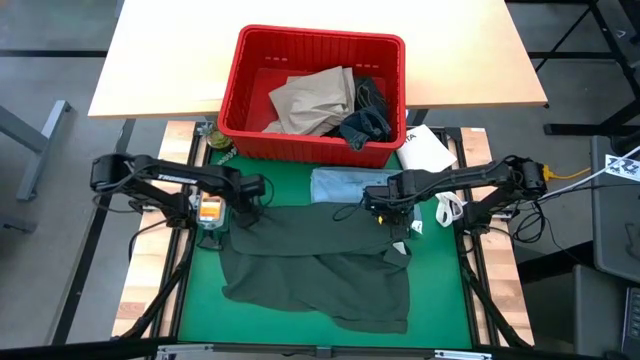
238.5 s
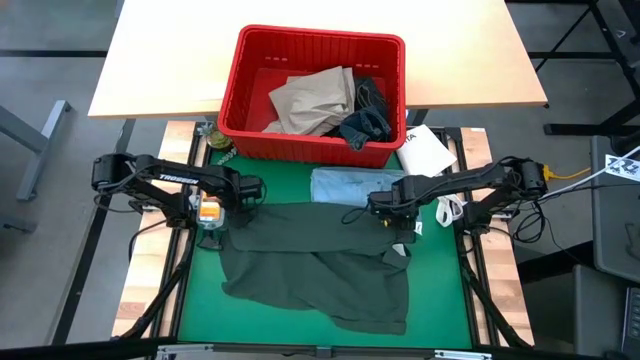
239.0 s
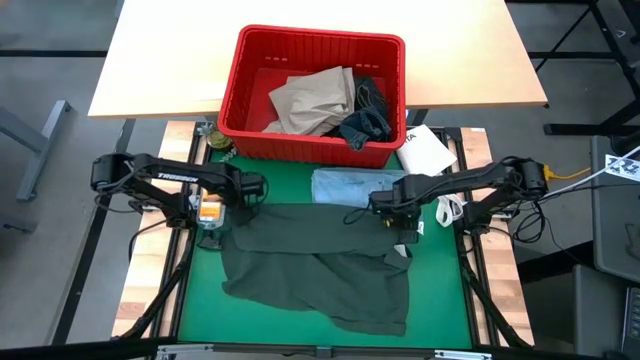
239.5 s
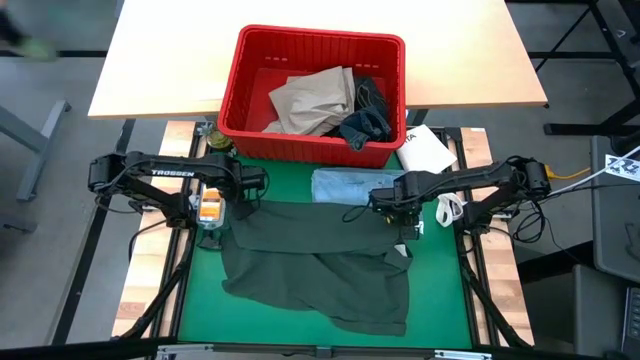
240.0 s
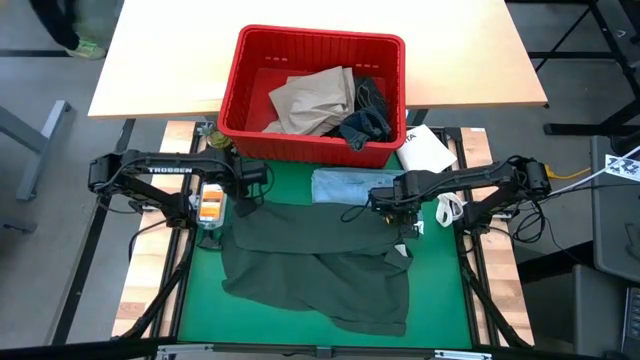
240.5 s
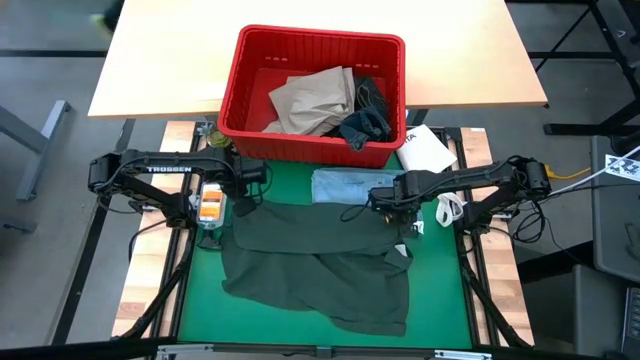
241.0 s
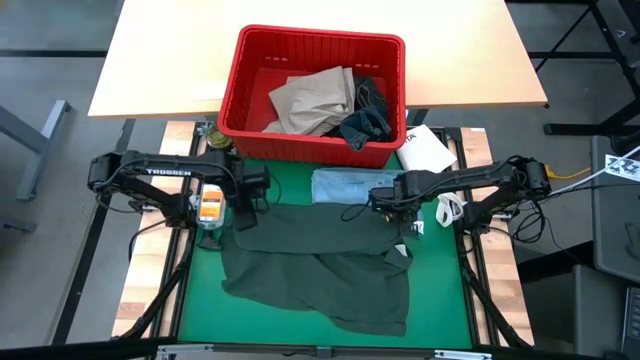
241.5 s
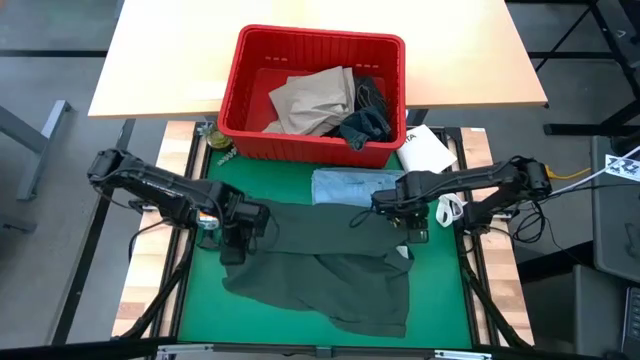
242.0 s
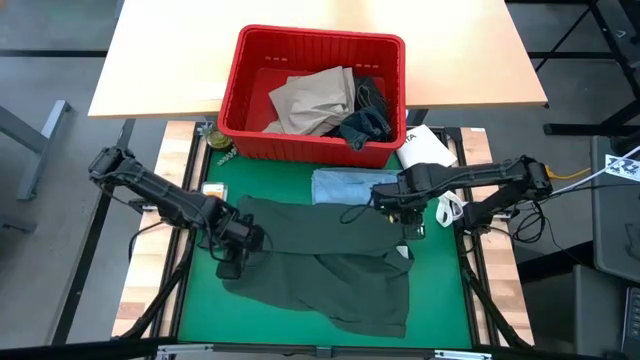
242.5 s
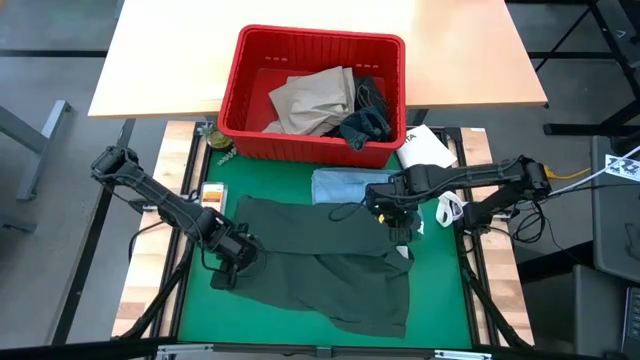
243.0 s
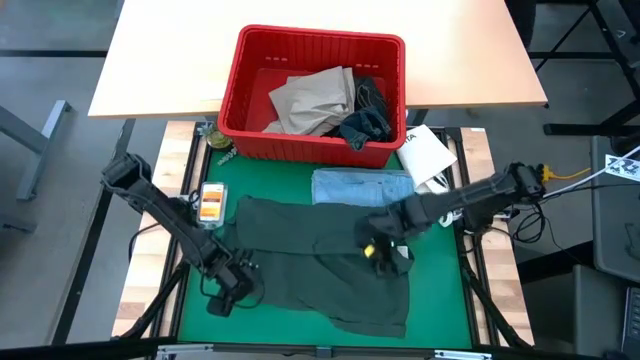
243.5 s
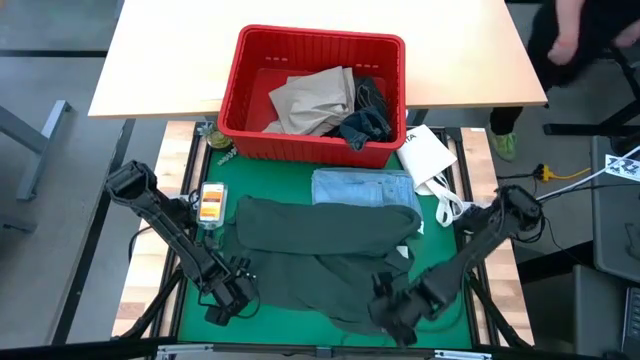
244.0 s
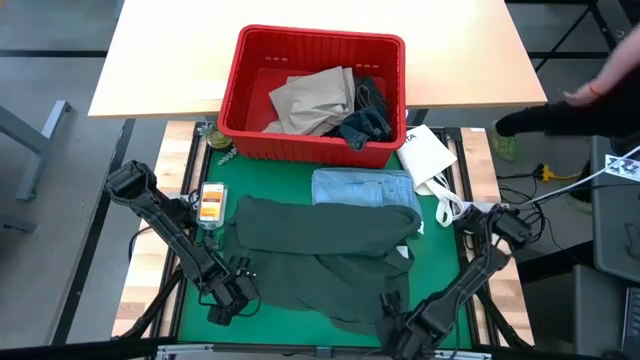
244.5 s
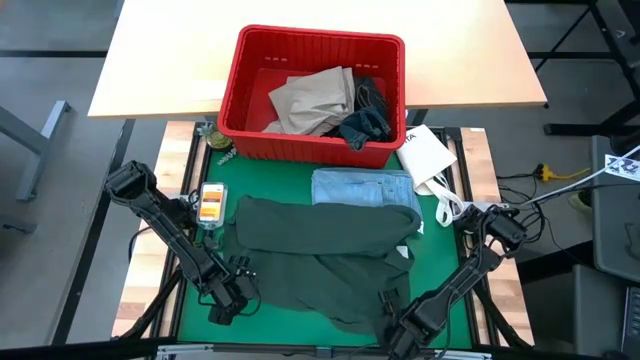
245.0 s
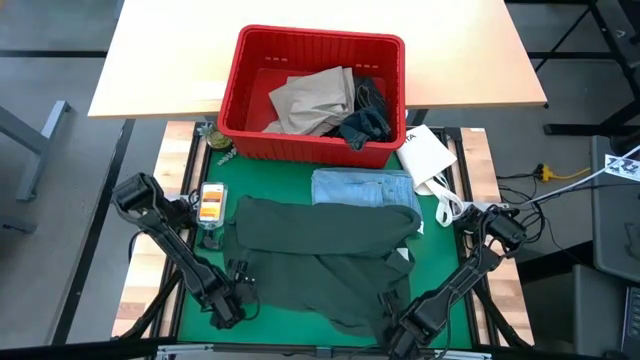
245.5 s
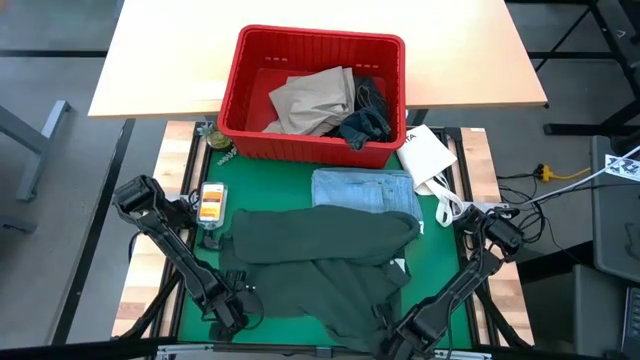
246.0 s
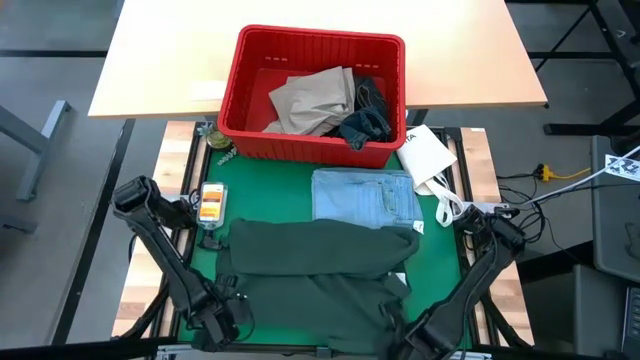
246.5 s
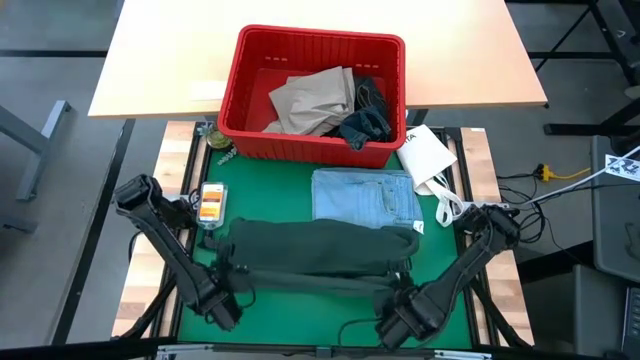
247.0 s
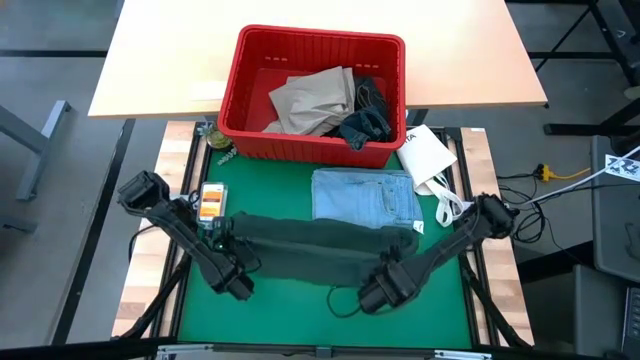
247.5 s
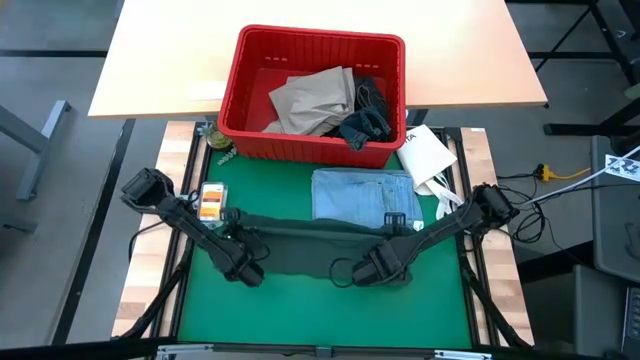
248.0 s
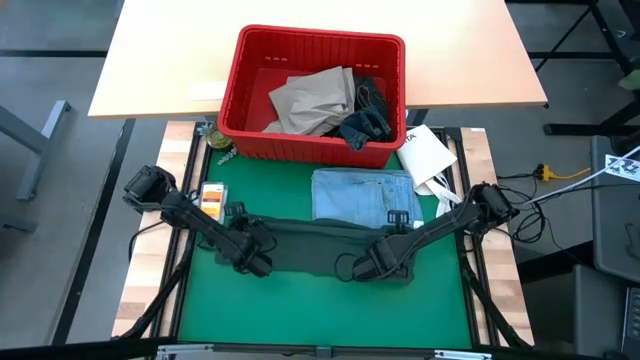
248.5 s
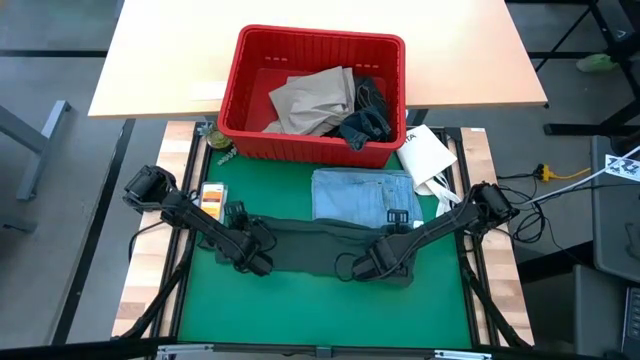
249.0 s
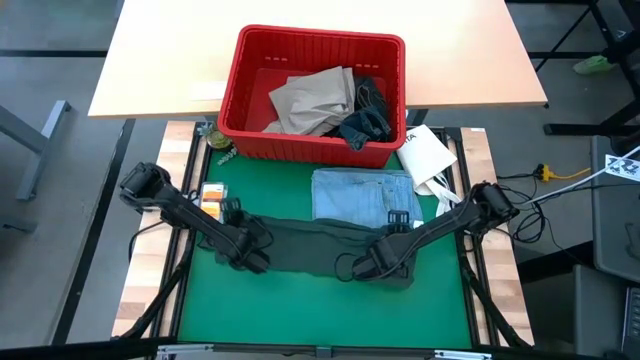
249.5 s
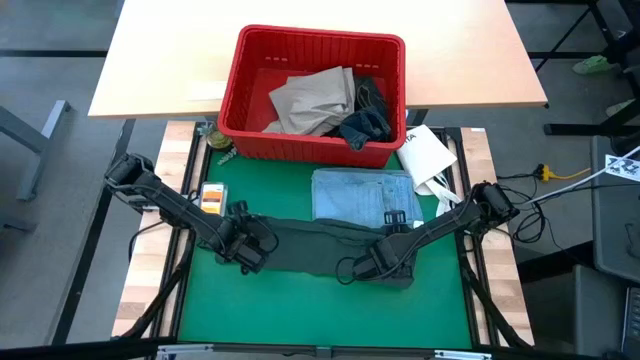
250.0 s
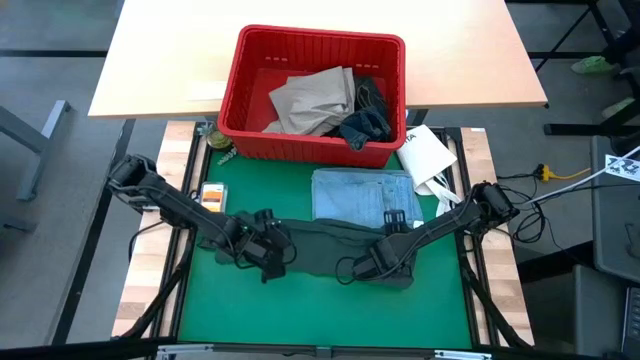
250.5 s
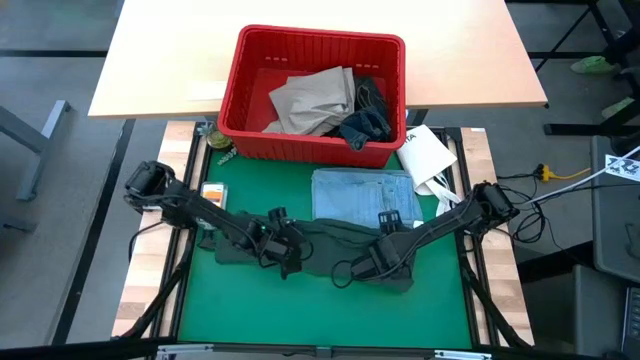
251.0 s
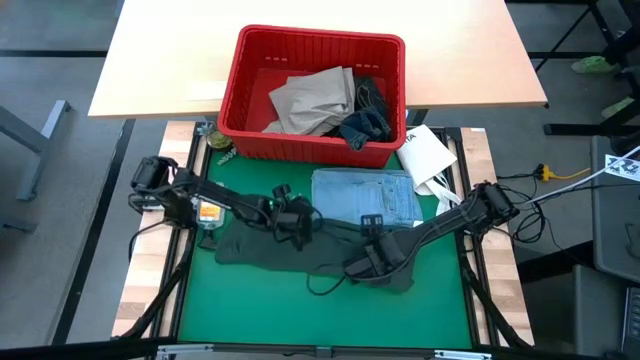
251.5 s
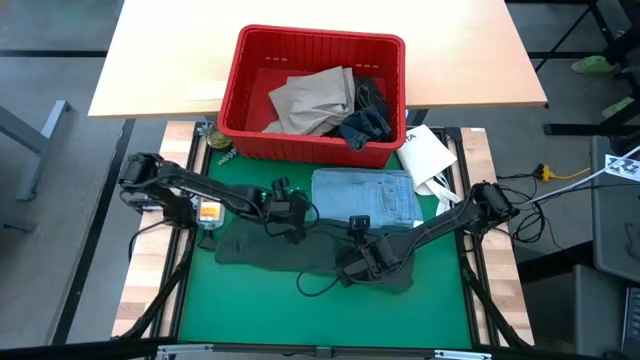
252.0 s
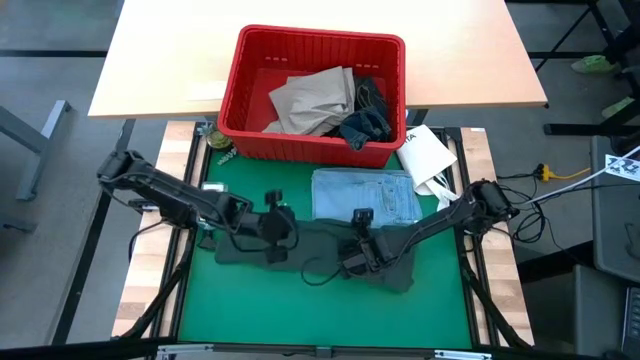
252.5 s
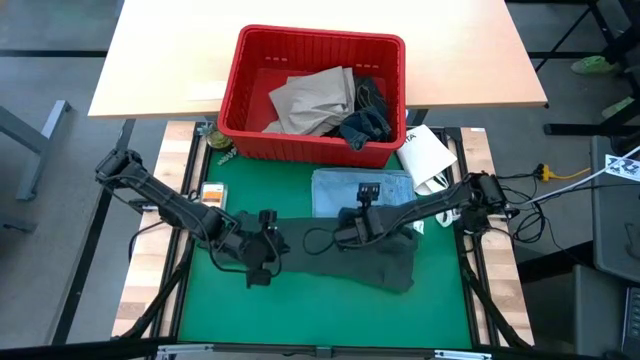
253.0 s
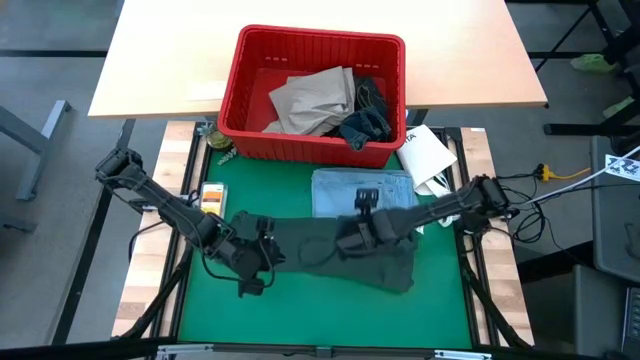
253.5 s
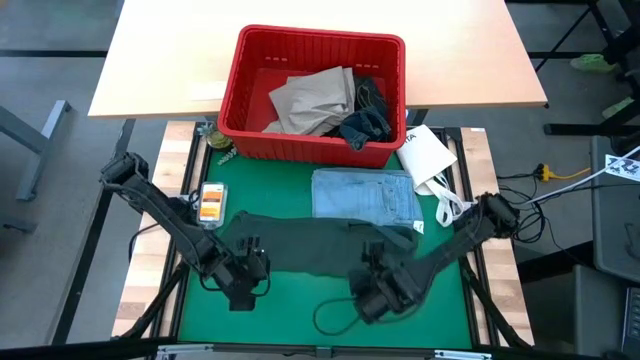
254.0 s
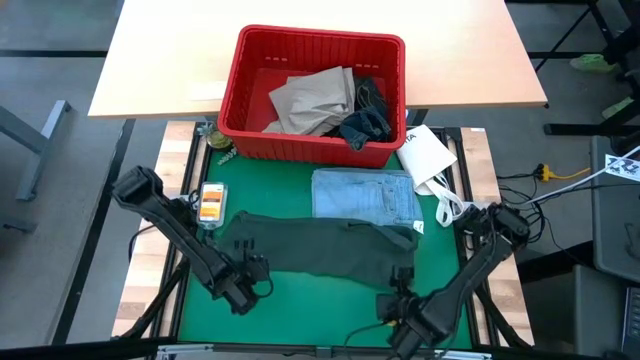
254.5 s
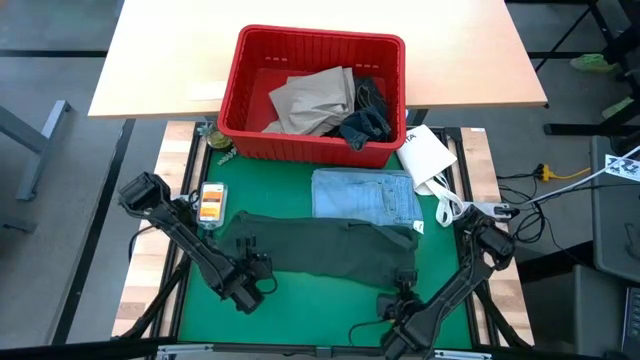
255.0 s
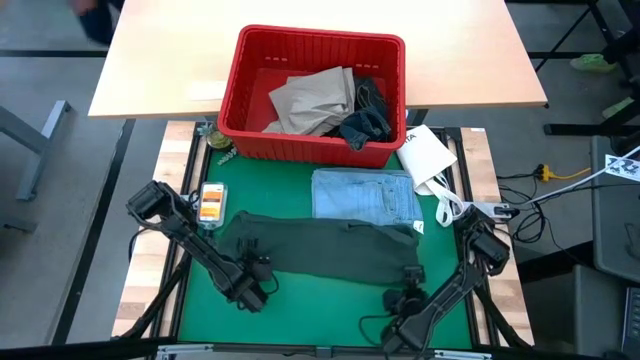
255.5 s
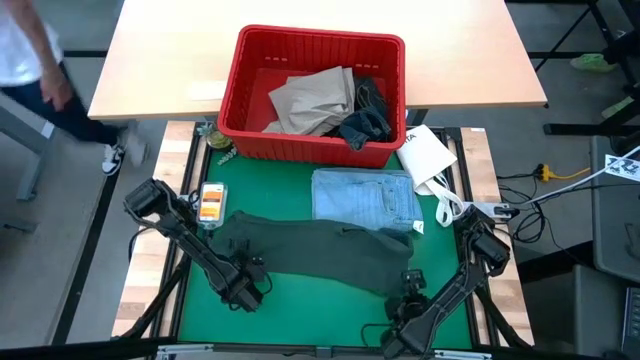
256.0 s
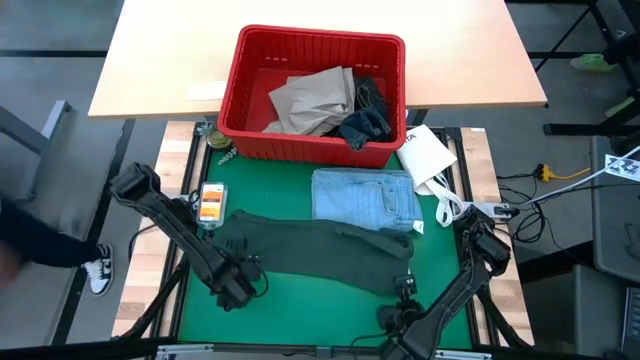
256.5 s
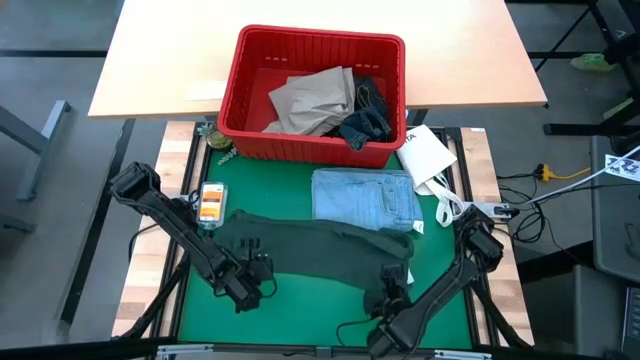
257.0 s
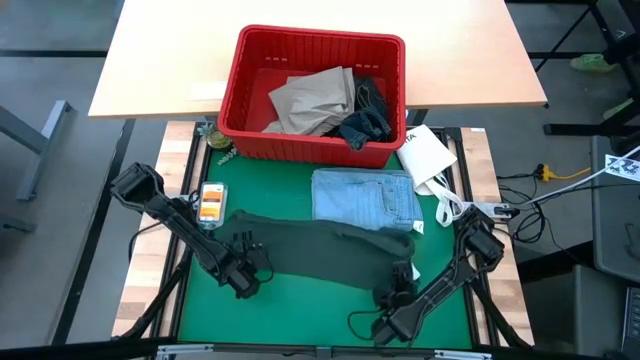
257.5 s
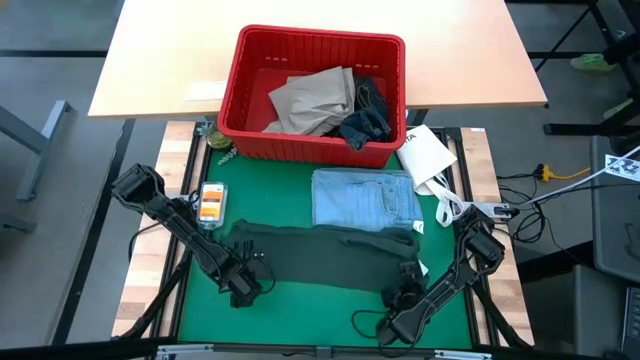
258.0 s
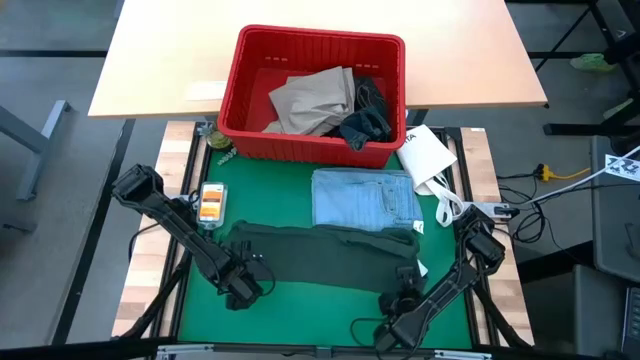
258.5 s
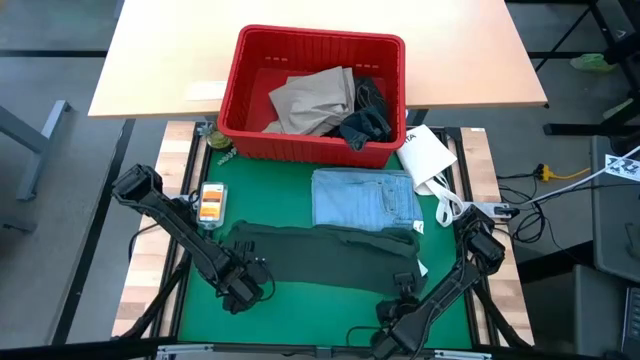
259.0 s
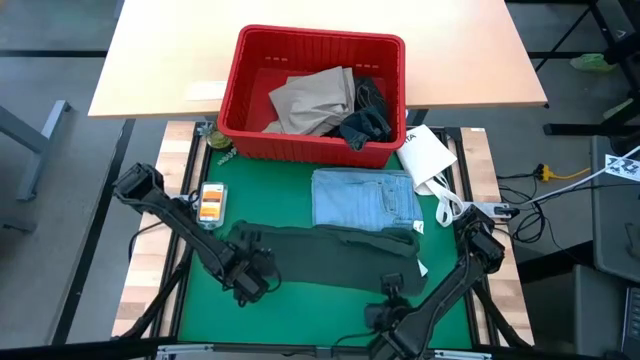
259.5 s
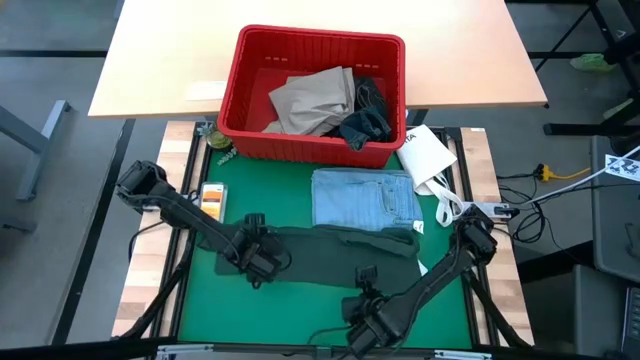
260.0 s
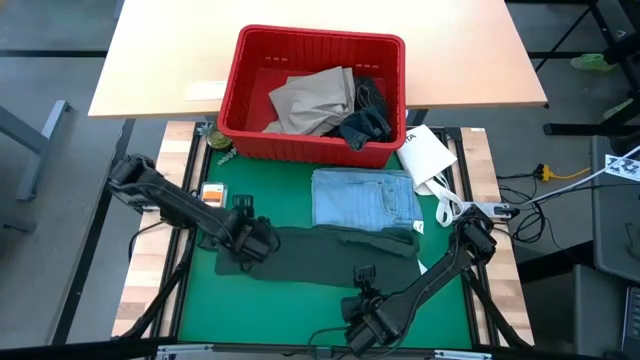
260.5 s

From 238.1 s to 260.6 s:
Task: Fold Laundry from Bin
Fold the green polo shirt
